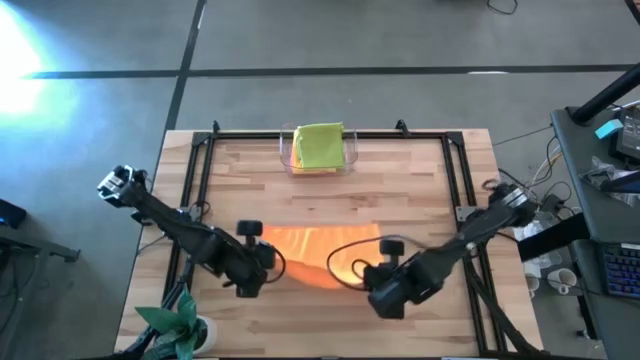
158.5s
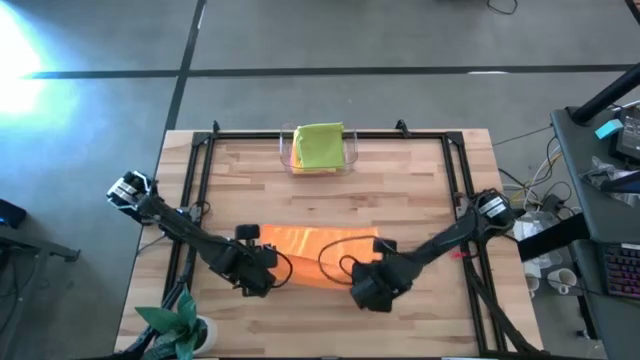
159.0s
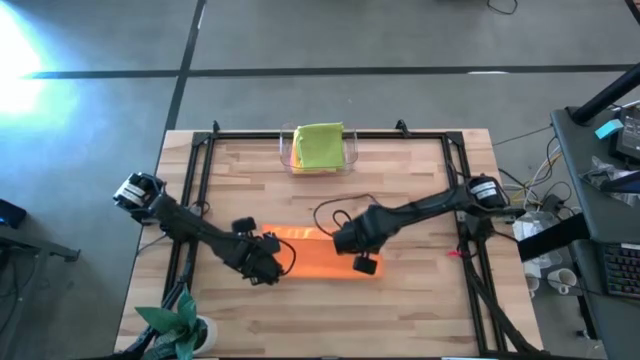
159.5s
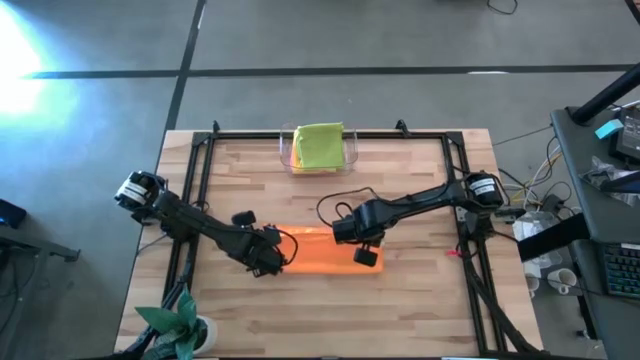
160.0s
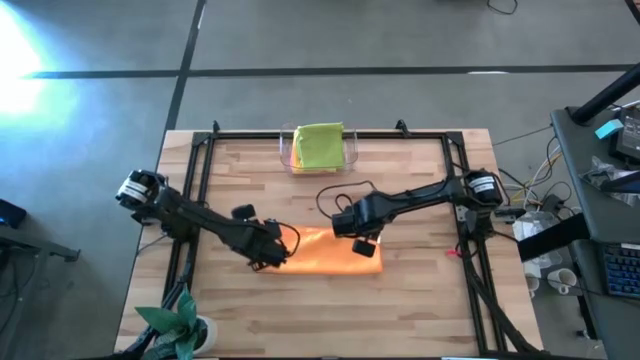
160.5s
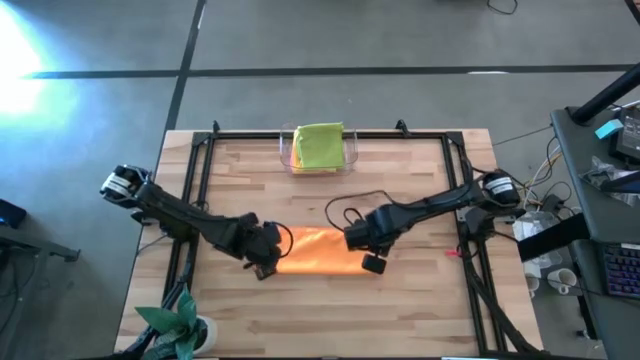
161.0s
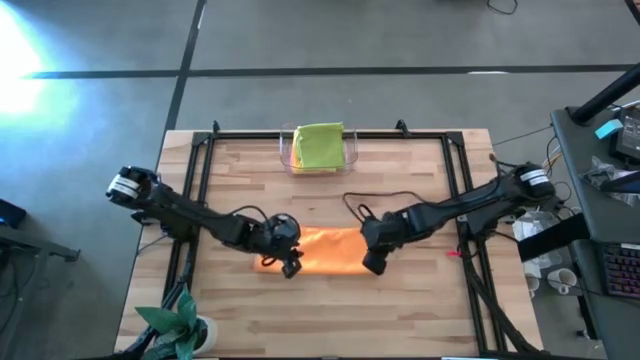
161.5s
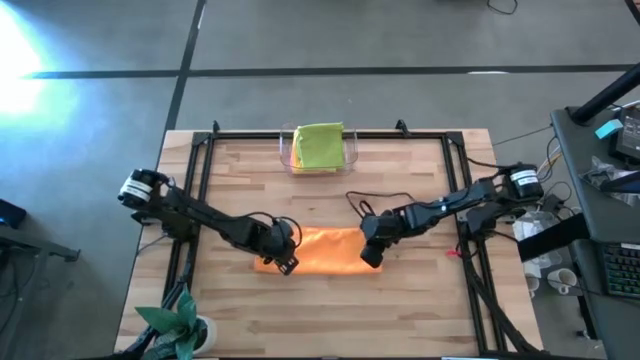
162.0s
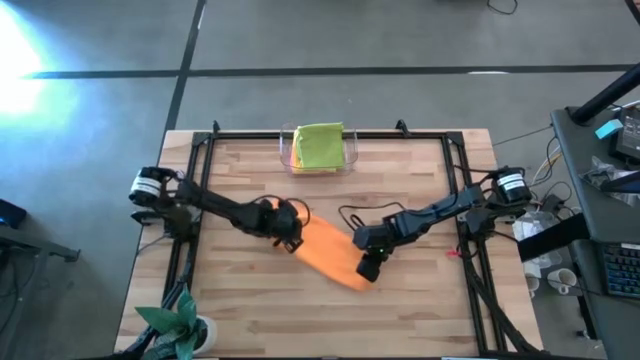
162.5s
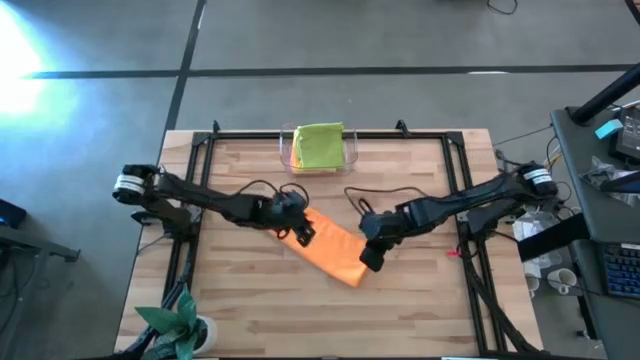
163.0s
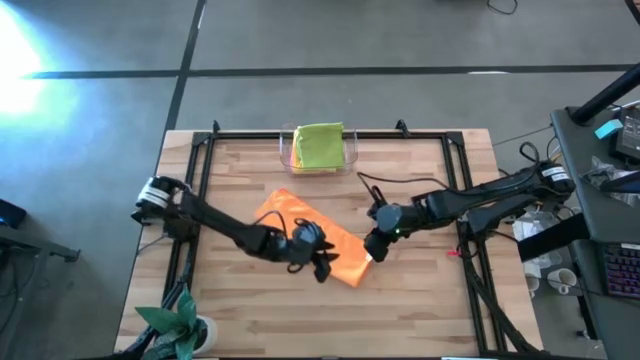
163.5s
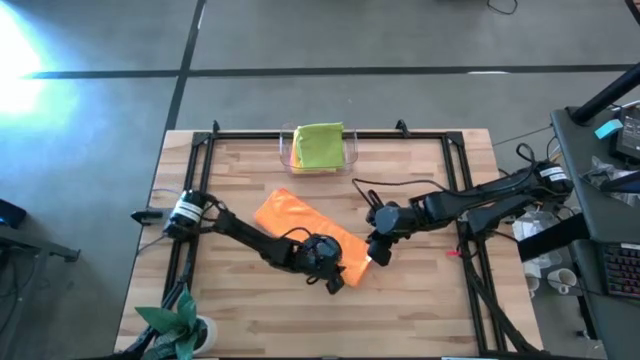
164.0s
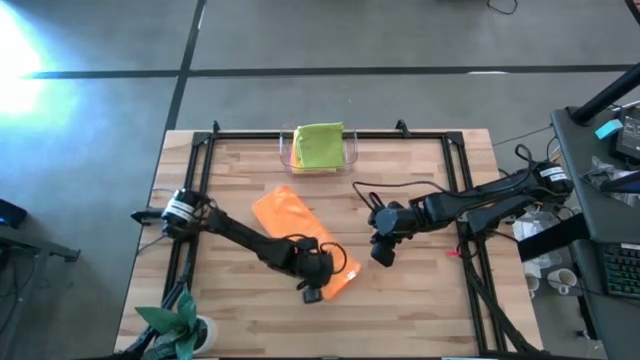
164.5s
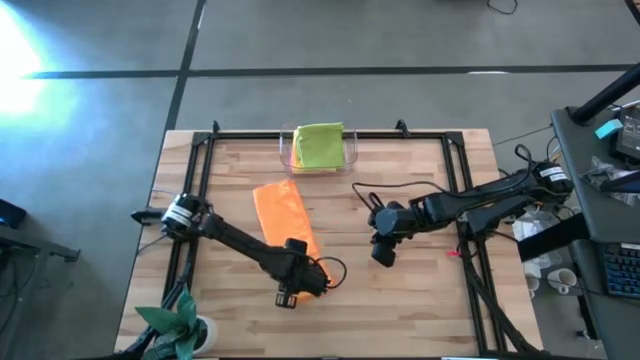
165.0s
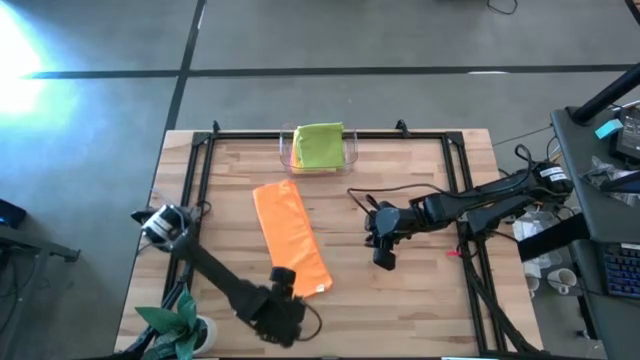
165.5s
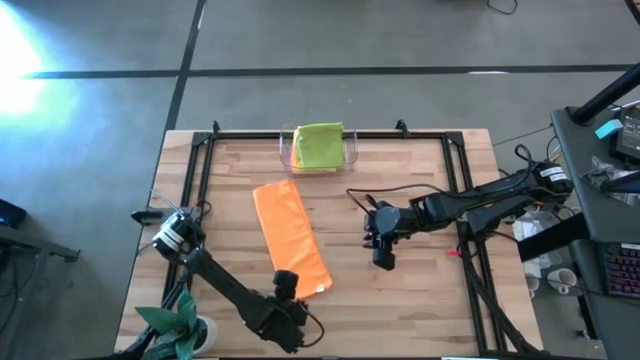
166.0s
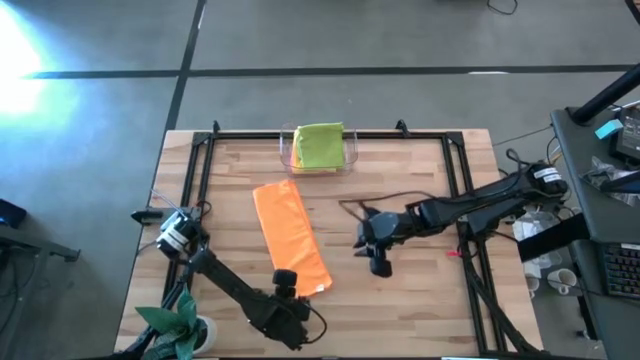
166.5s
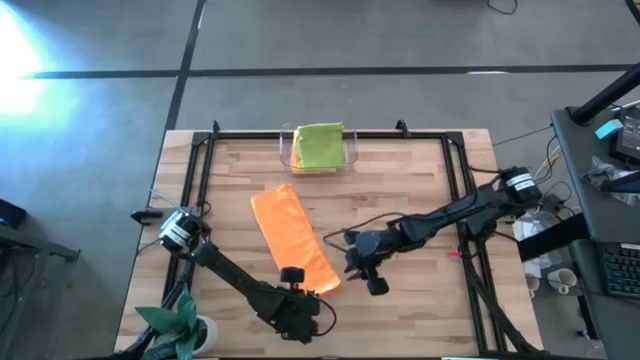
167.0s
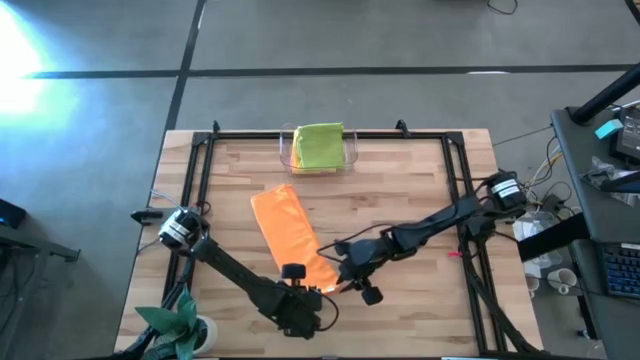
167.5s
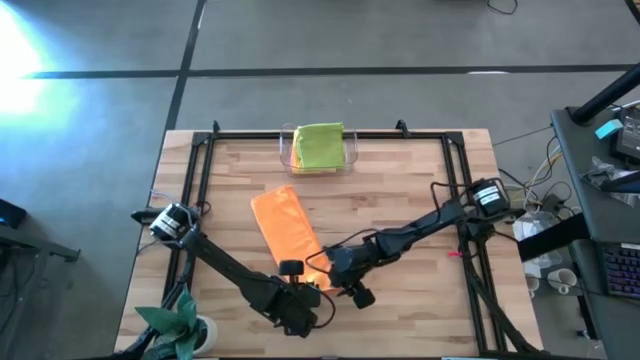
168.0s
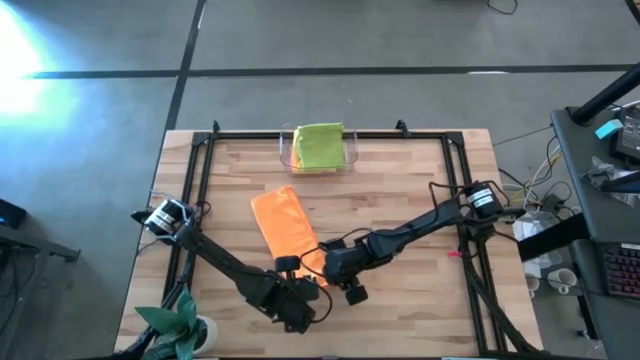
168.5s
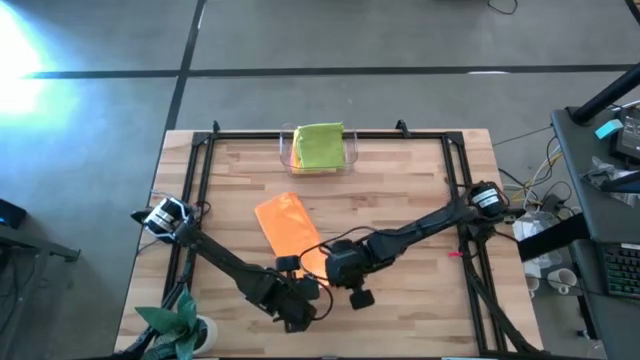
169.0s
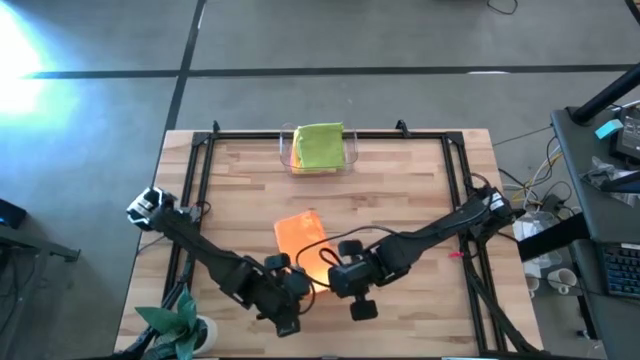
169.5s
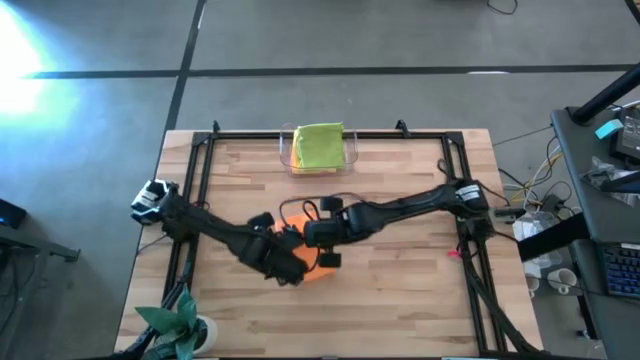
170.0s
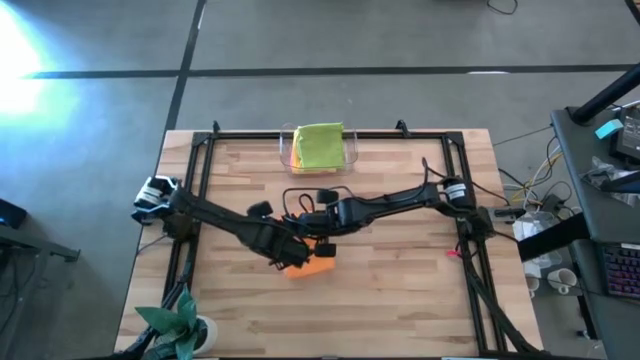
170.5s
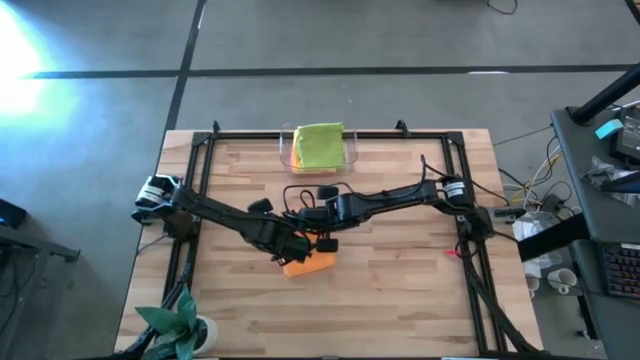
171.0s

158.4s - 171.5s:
Task: Fold microfiber towels
Fold the orange microfiber cloth

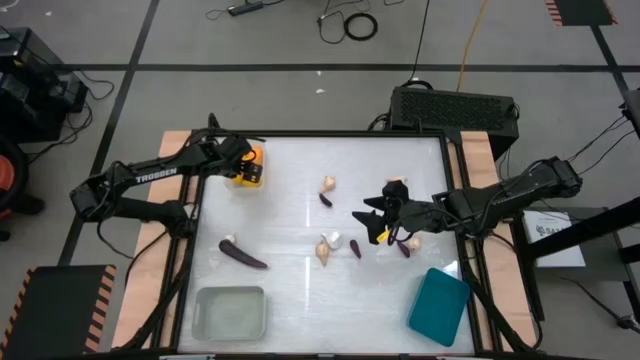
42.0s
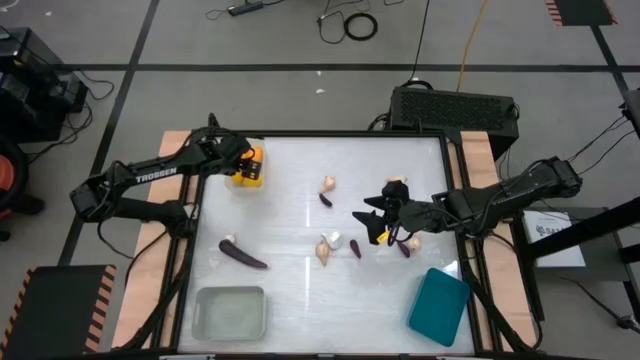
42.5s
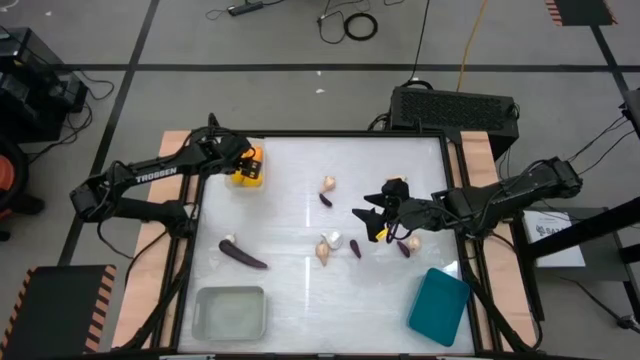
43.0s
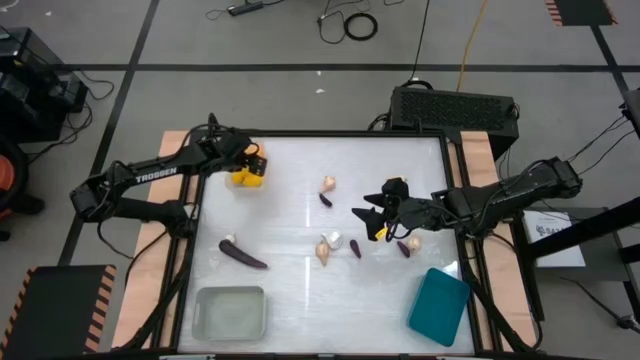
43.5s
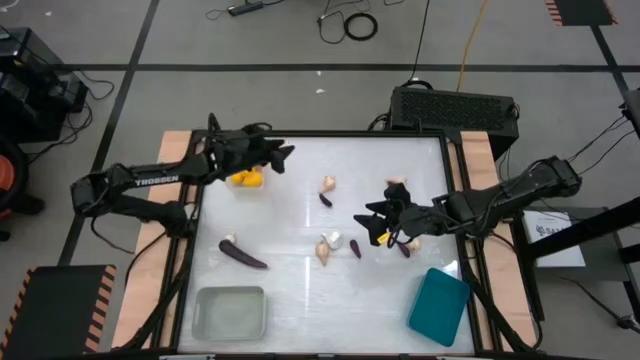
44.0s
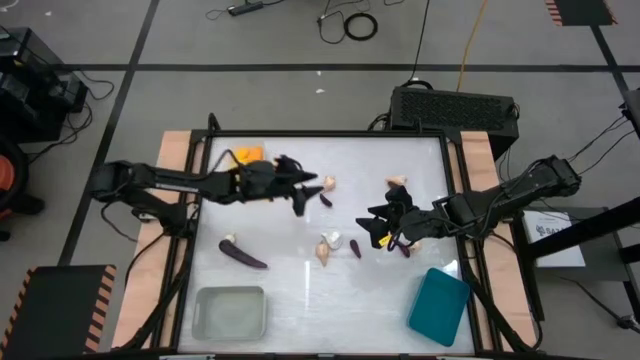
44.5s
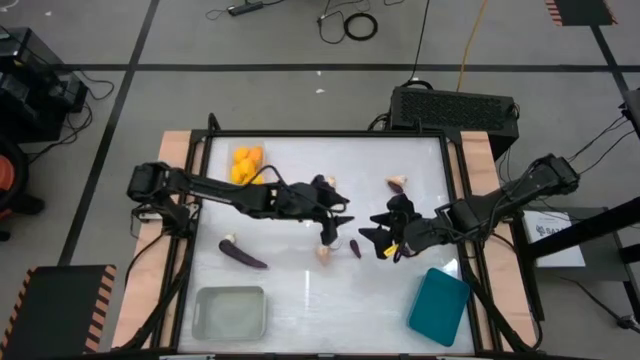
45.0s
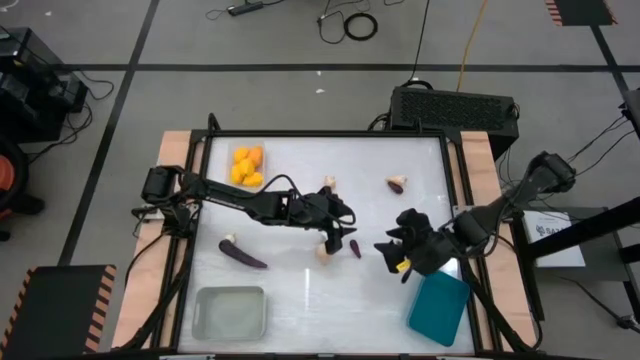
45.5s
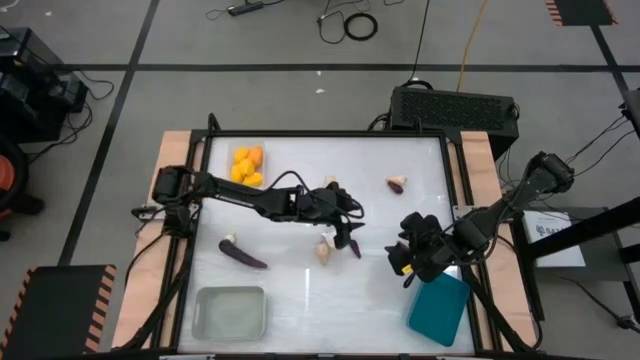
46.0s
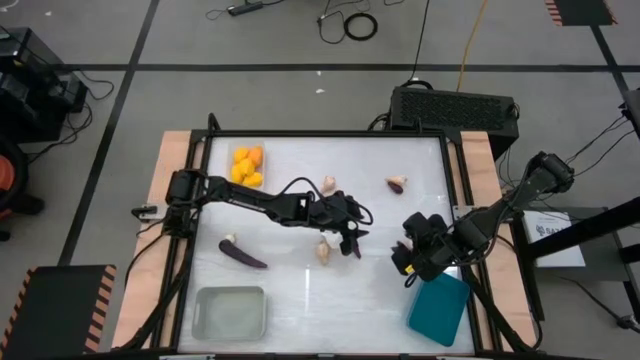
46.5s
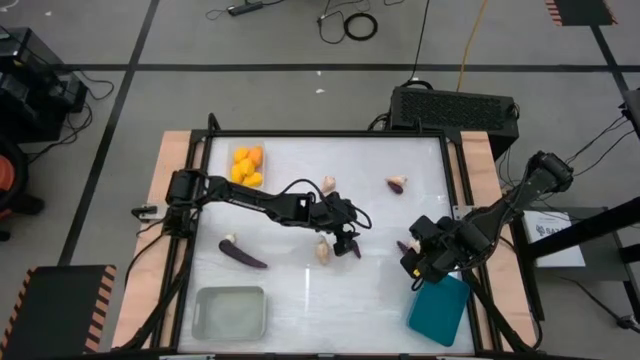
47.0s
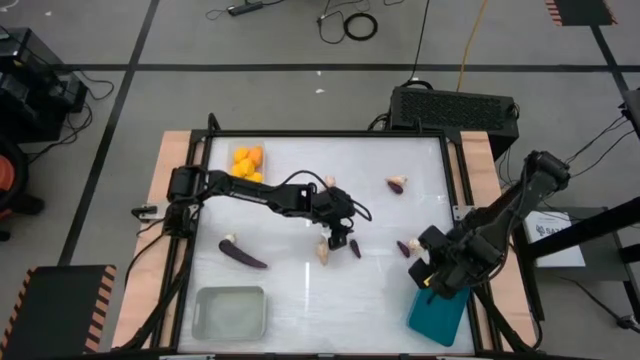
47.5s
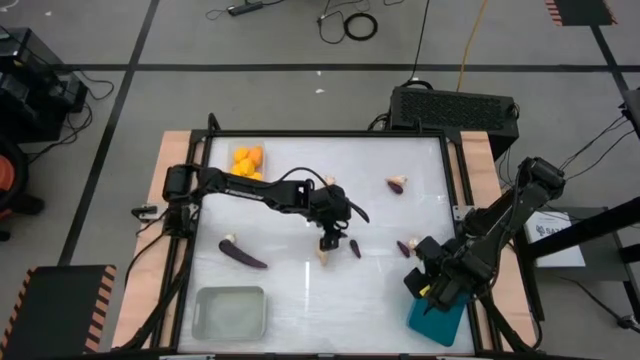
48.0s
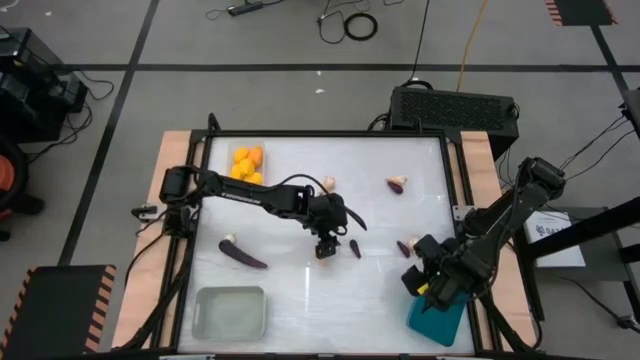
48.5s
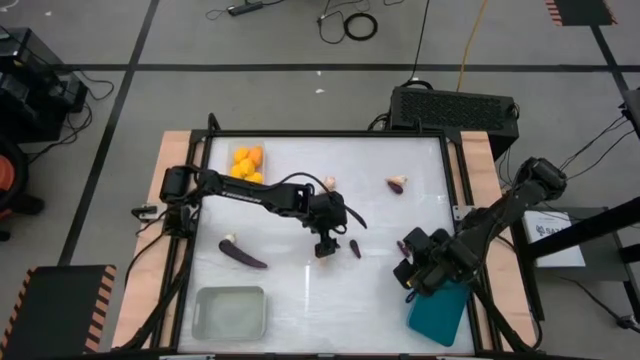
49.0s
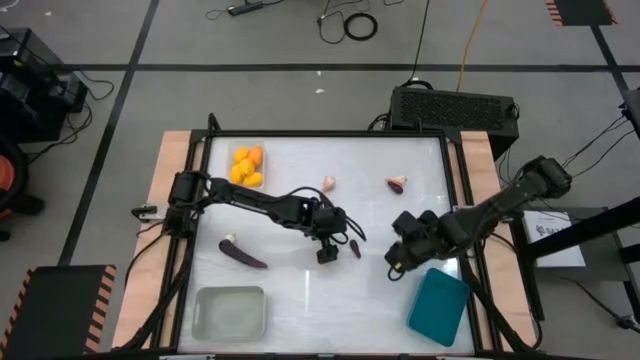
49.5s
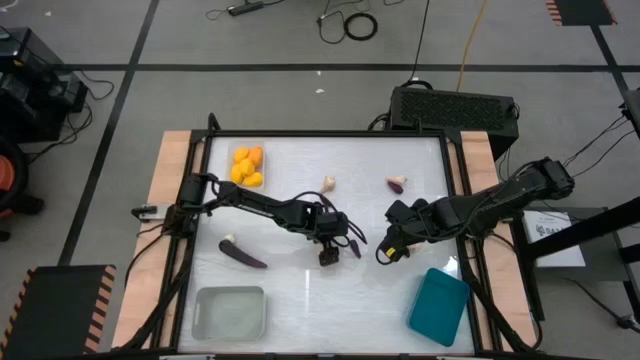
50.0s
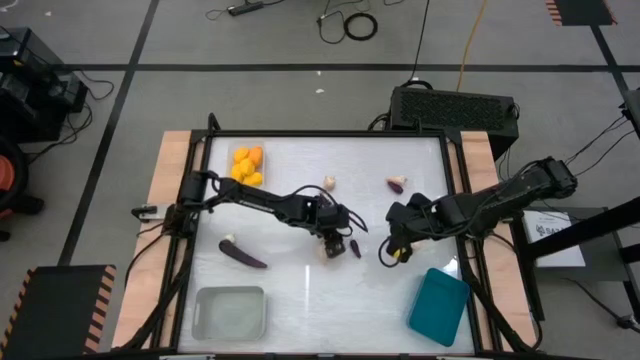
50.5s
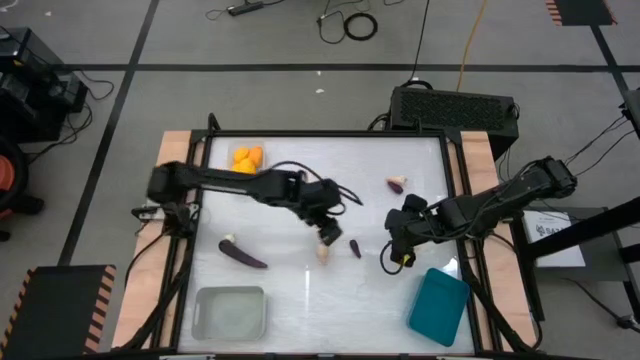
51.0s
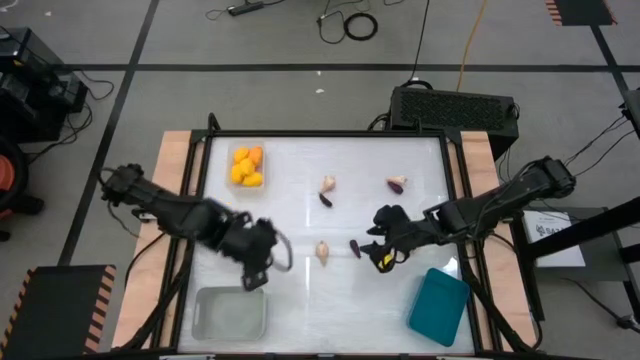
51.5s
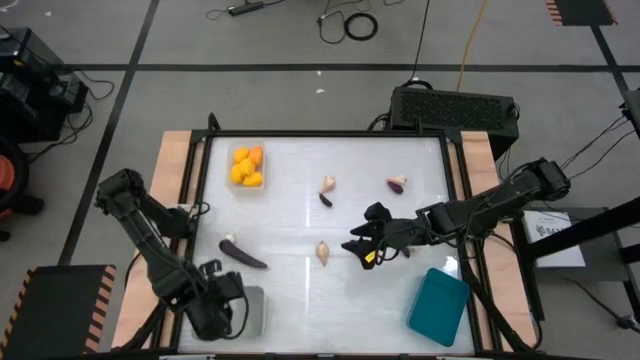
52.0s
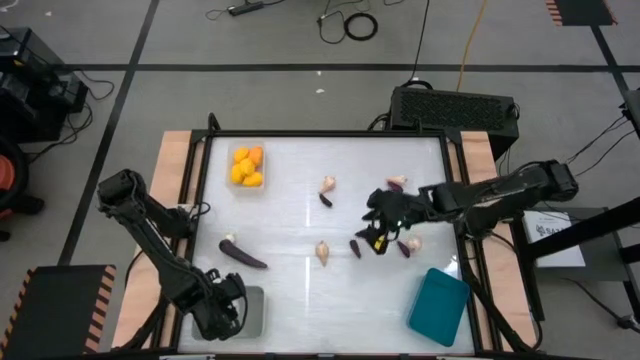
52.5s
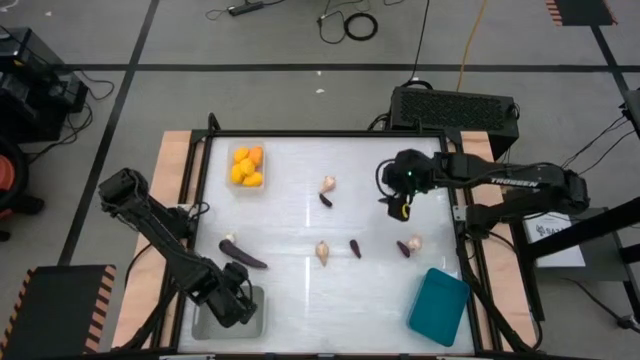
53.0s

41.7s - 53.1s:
Task: Sort produce into baskets
Put the white garlic into the gray bin
